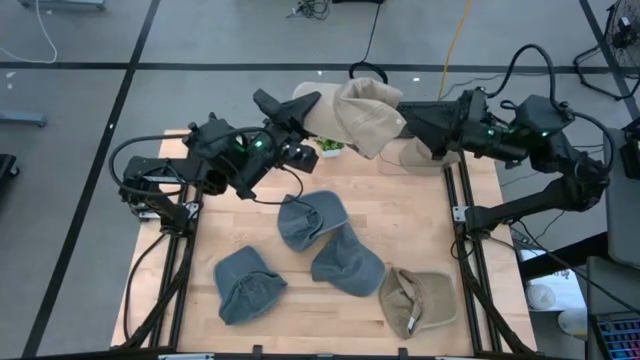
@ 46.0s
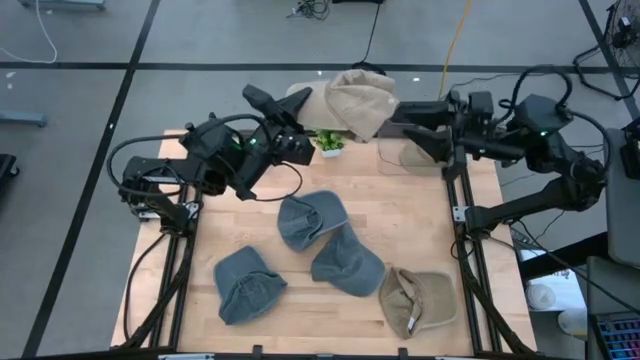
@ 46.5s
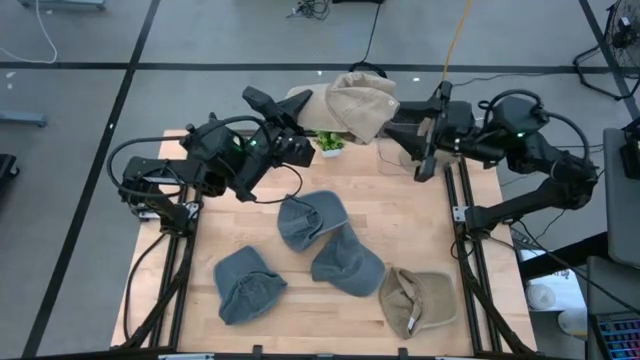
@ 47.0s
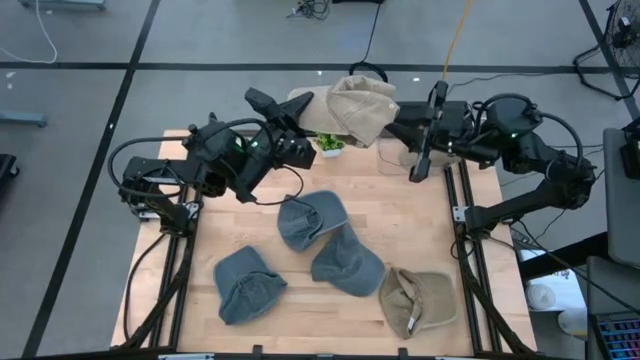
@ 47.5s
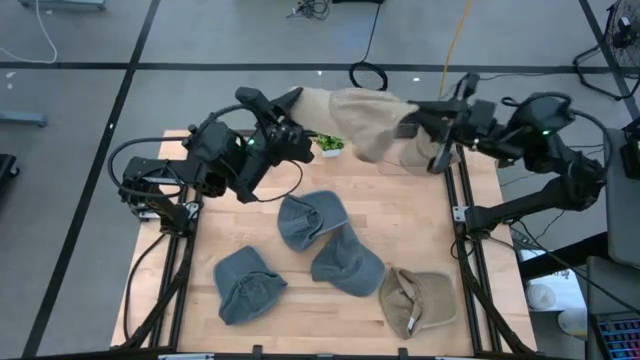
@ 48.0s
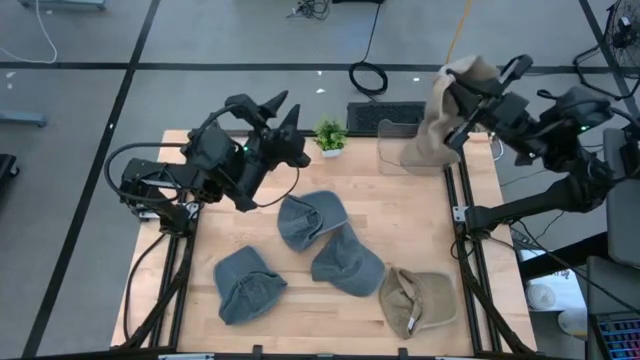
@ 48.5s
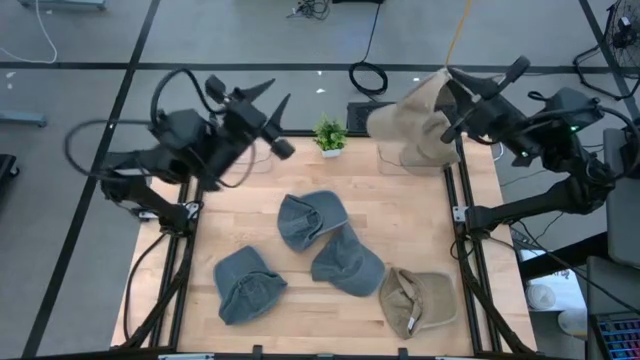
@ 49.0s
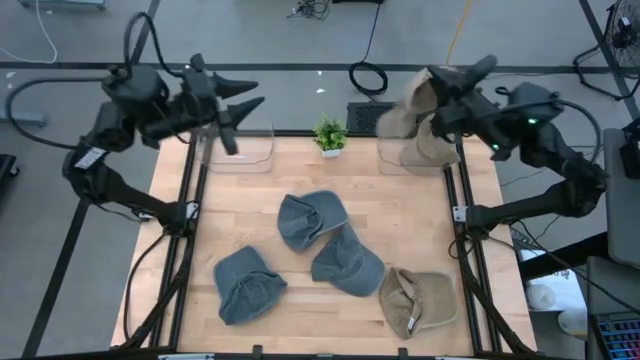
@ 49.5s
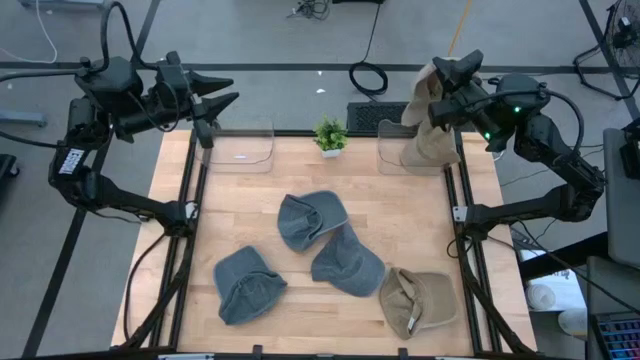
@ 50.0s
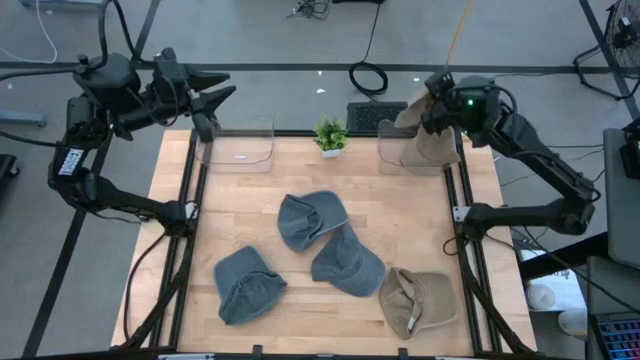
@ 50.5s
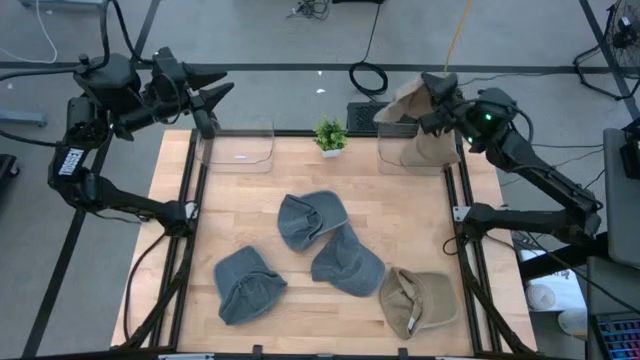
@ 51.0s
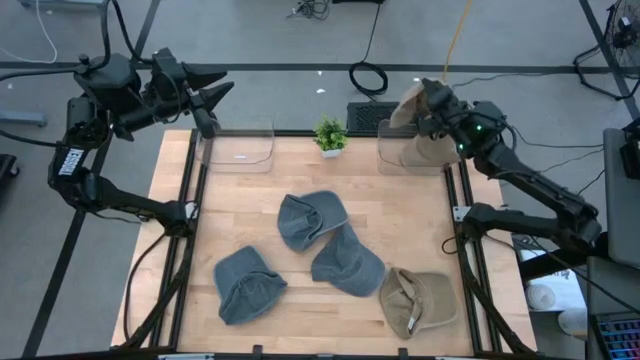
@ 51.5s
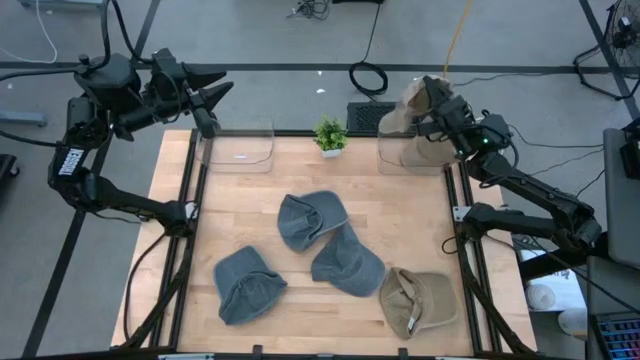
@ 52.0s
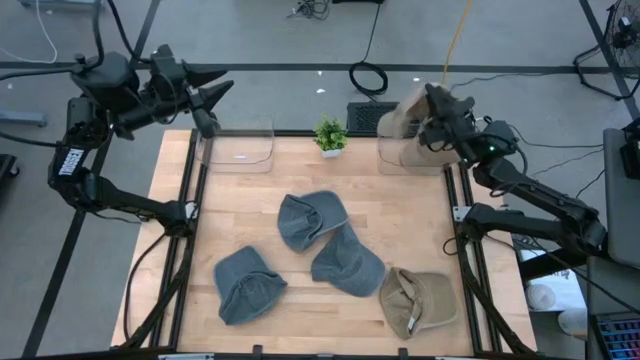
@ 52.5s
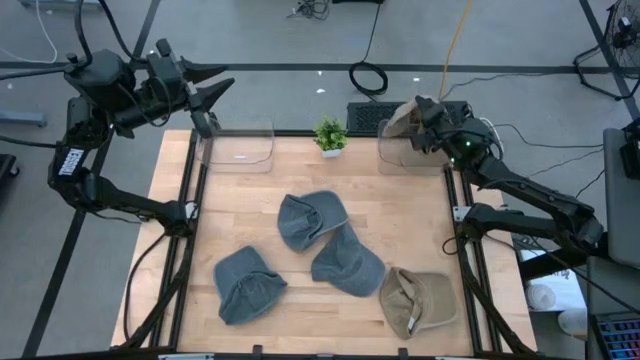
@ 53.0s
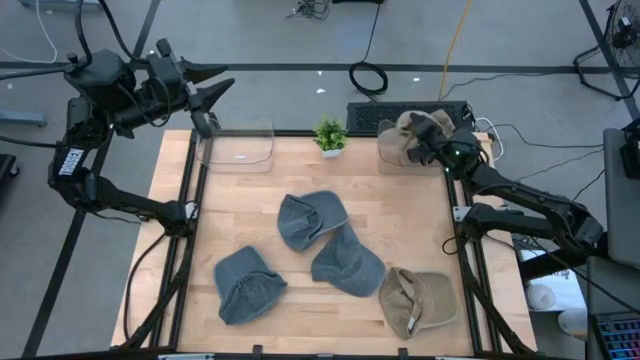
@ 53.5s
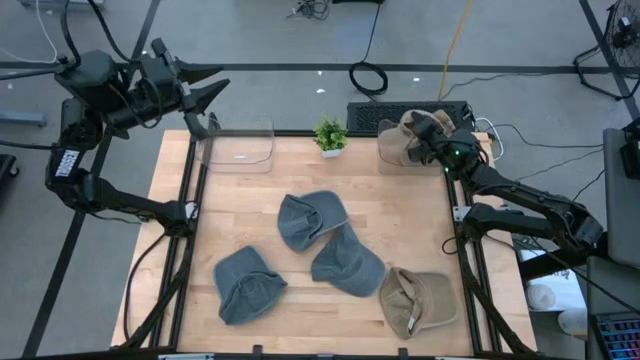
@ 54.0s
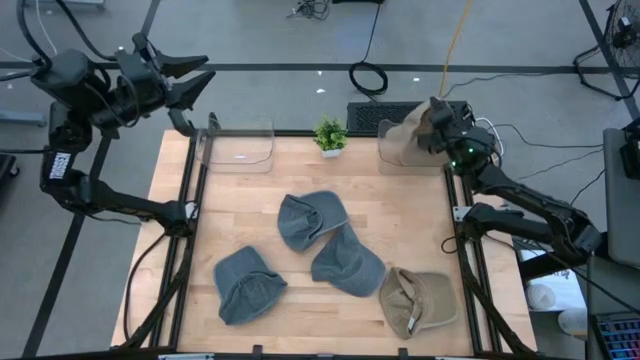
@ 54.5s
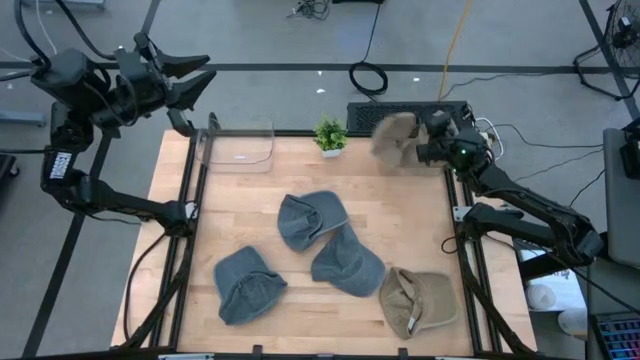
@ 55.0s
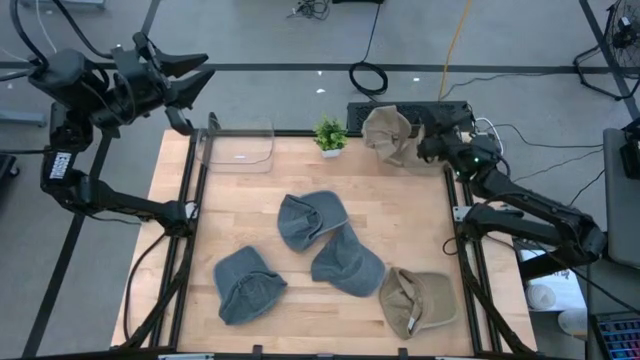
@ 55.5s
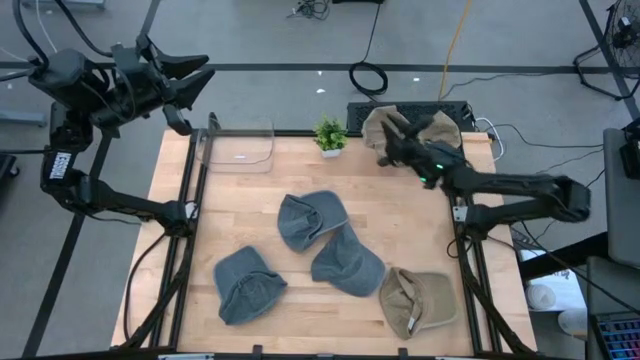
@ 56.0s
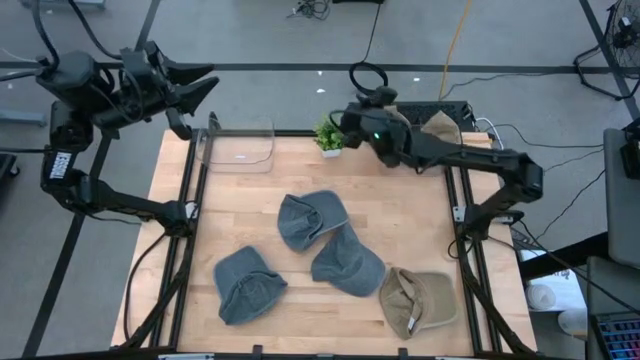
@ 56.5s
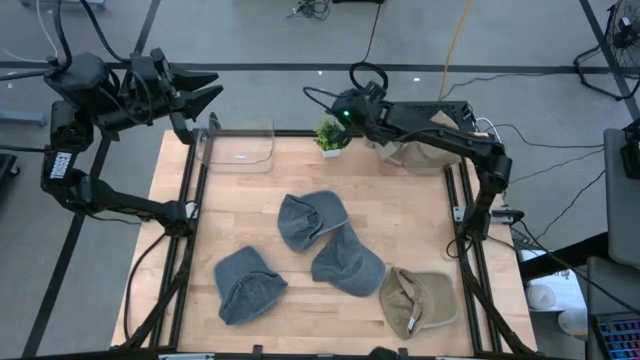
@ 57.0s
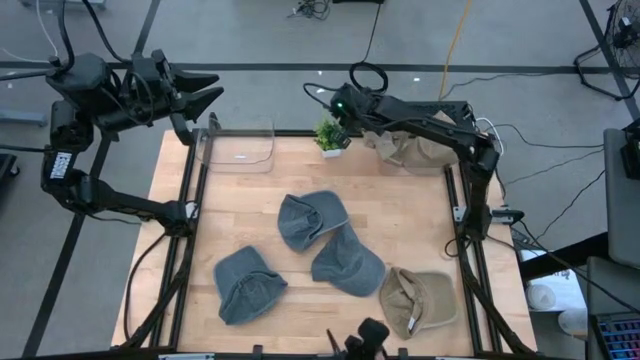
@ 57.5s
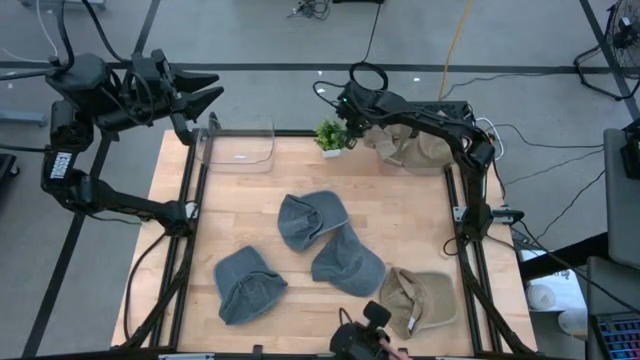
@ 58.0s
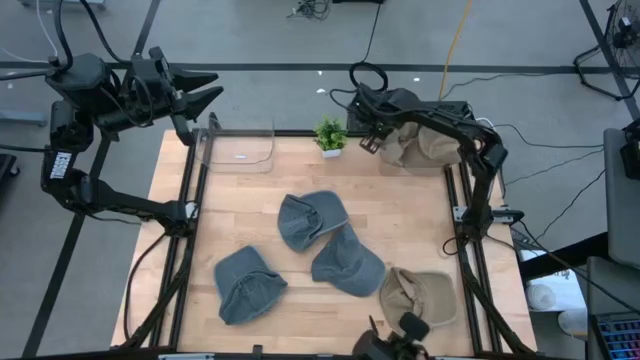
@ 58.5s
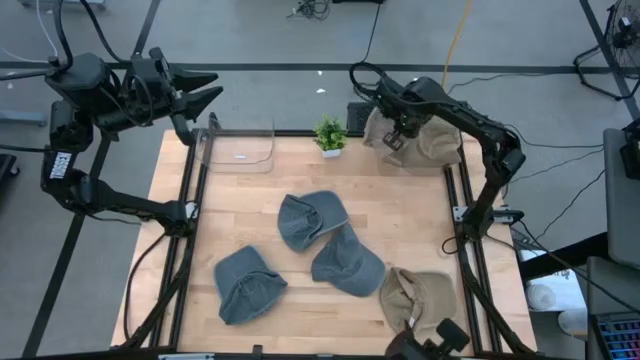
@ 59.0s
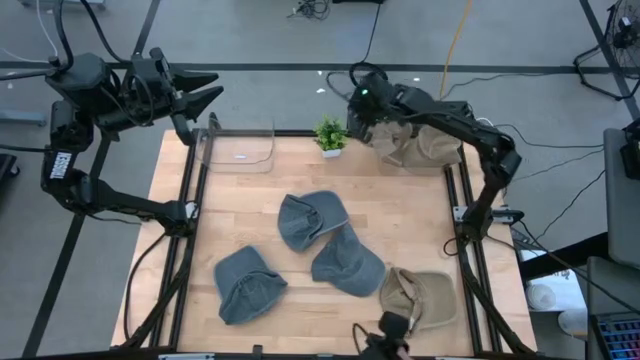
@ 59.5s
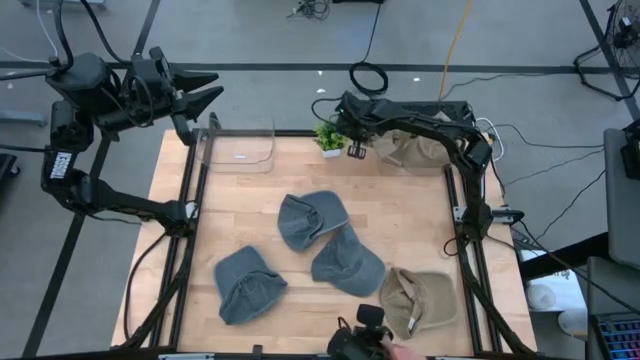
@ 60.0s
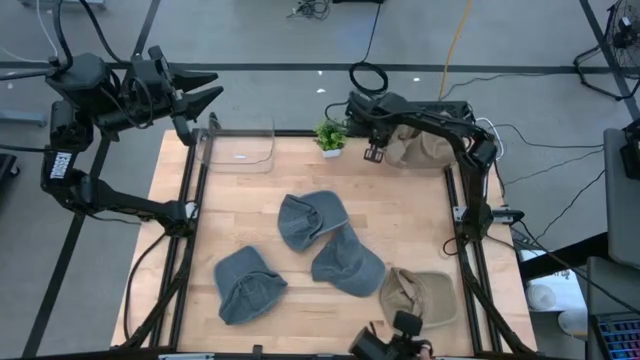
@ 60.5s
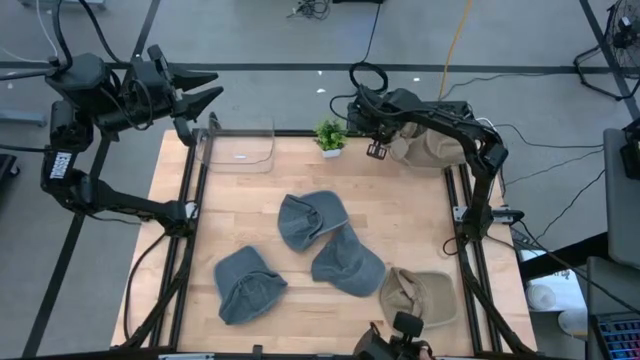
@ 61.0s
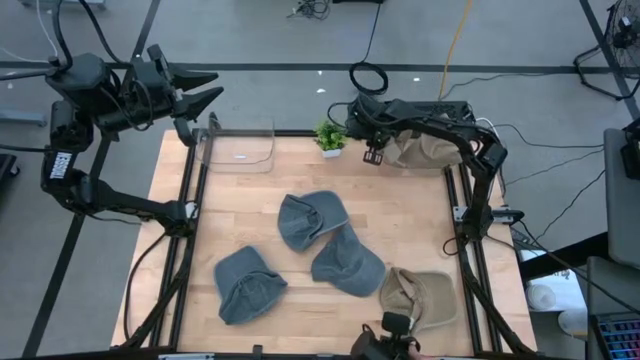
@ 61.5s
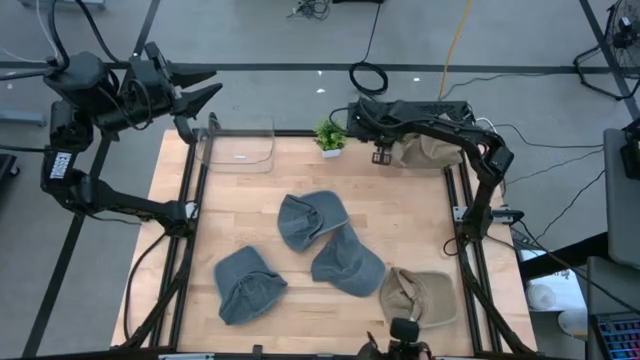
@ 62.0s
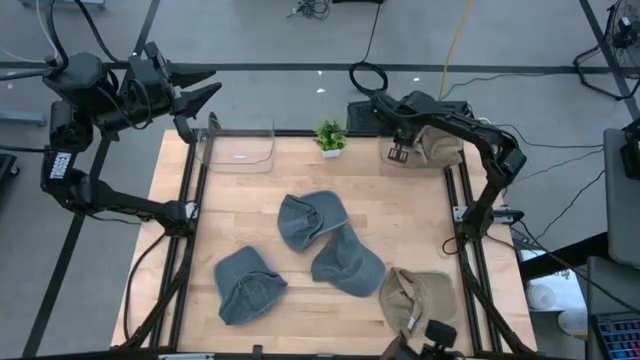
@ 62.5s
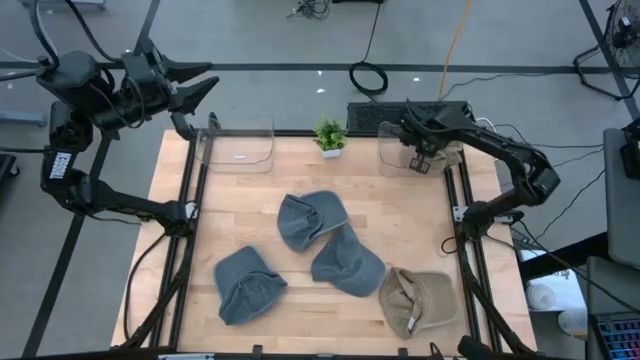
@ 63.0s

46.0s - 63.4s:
Task: Pick & Place hat
Put the top brown cap into the right transparent bin
